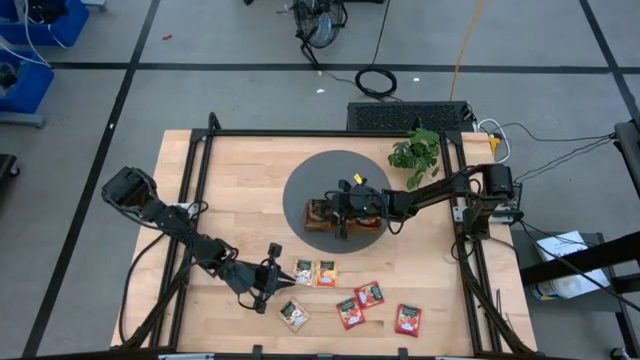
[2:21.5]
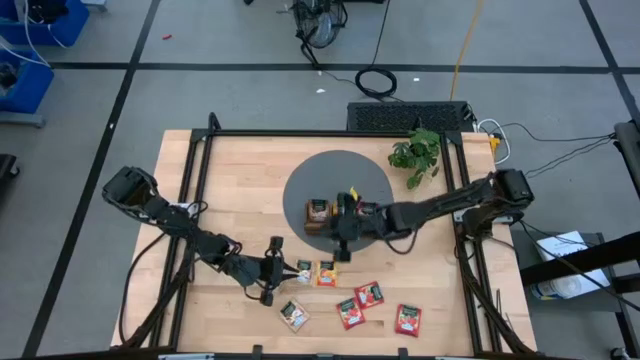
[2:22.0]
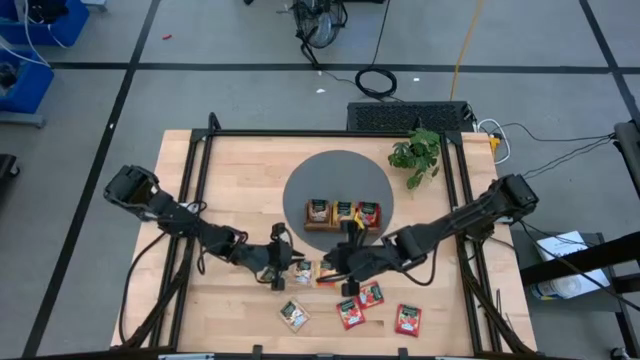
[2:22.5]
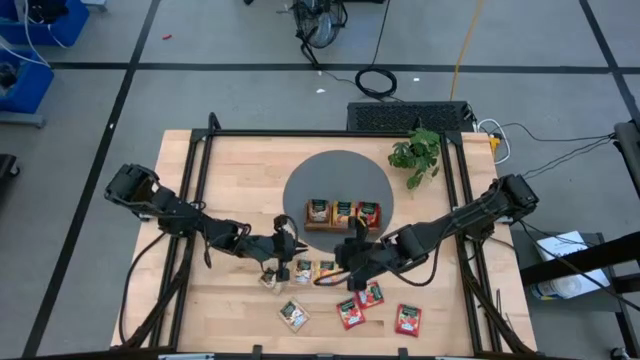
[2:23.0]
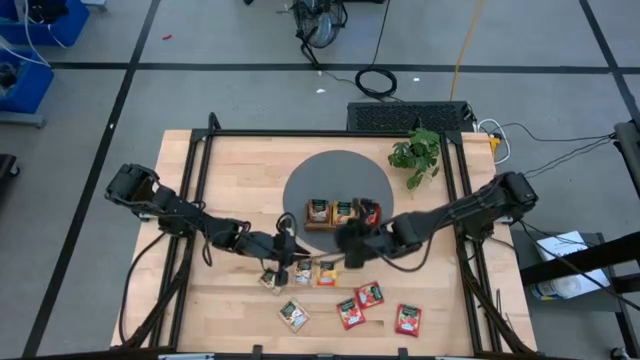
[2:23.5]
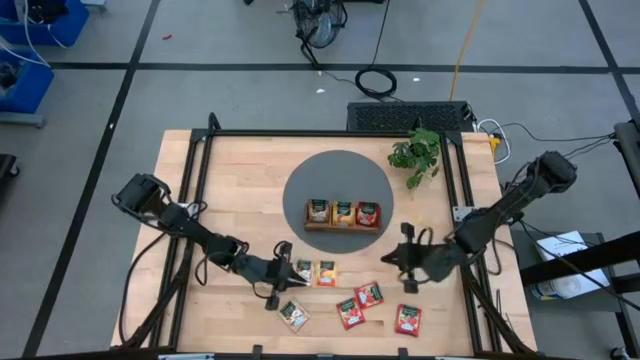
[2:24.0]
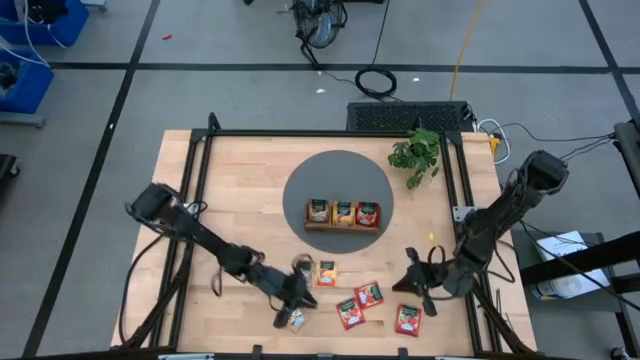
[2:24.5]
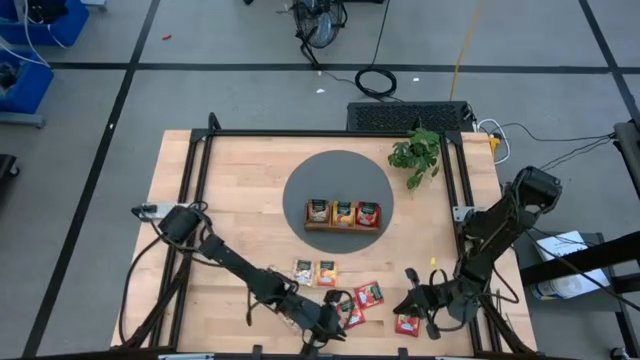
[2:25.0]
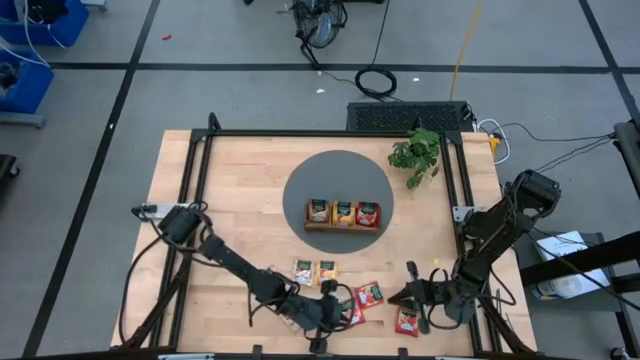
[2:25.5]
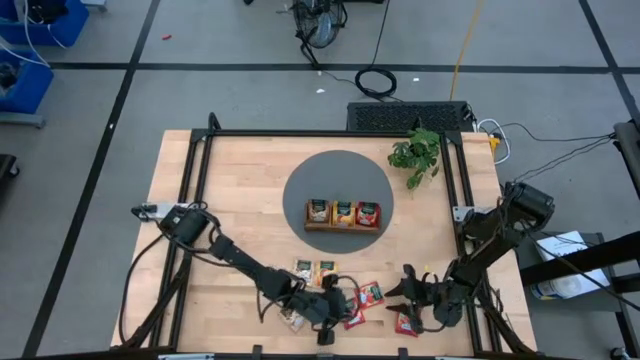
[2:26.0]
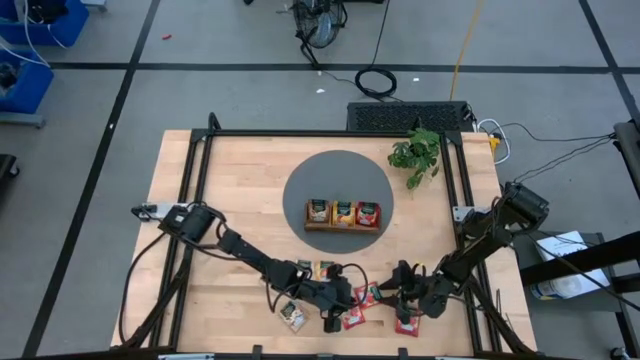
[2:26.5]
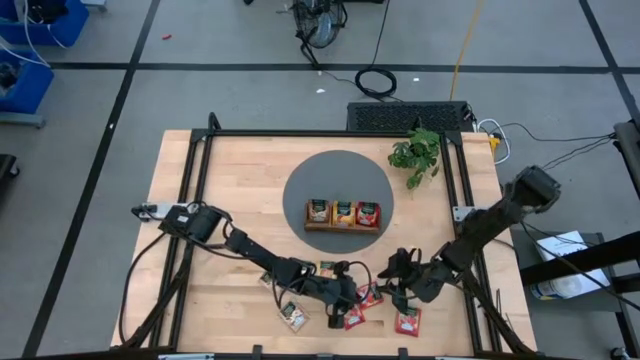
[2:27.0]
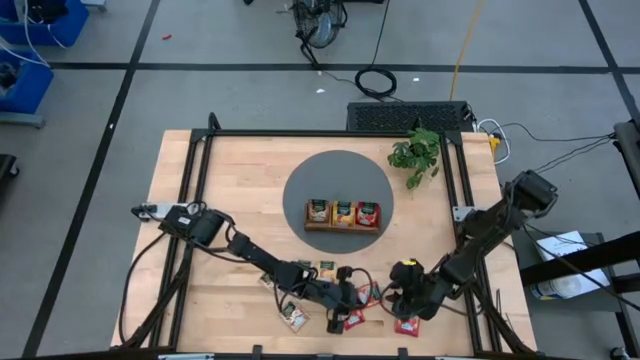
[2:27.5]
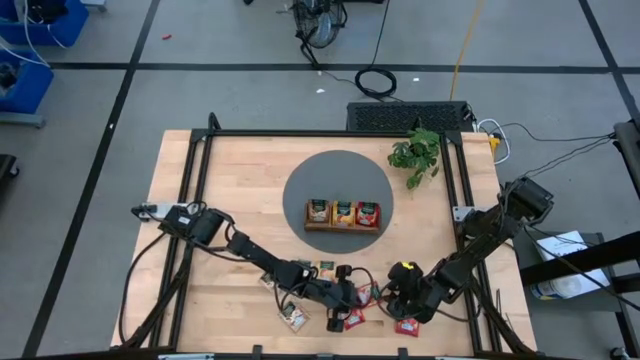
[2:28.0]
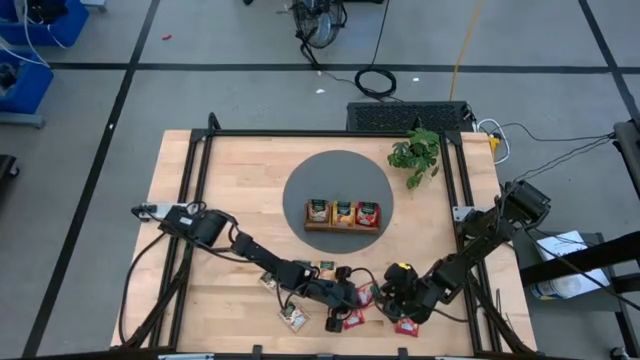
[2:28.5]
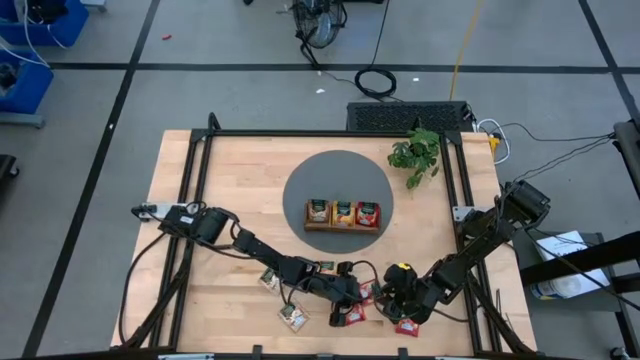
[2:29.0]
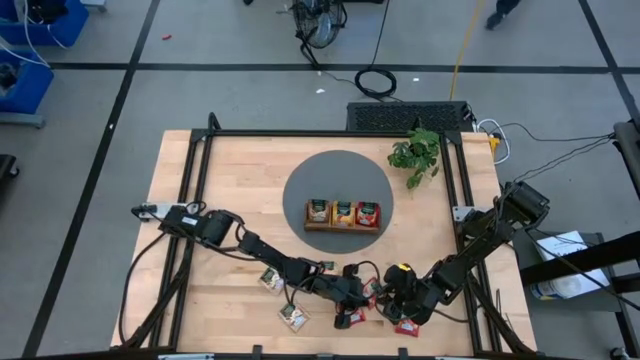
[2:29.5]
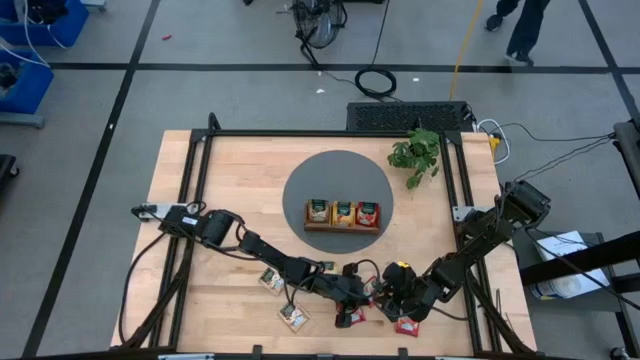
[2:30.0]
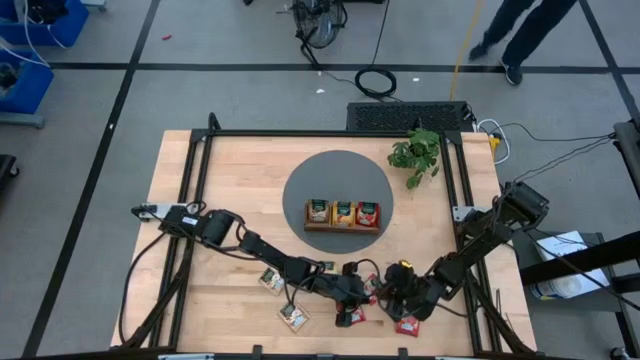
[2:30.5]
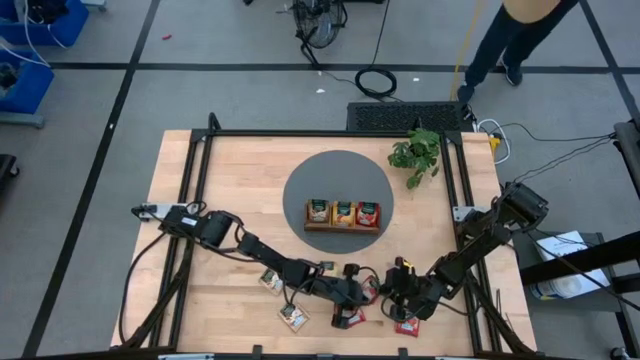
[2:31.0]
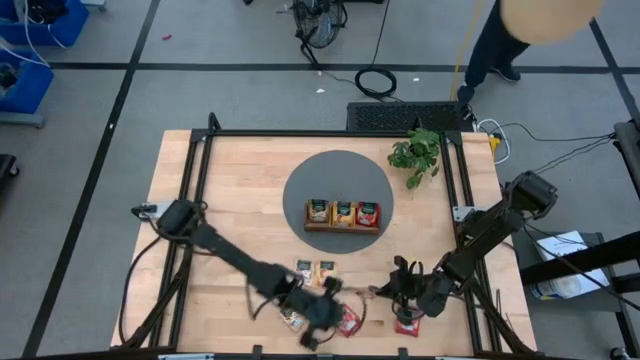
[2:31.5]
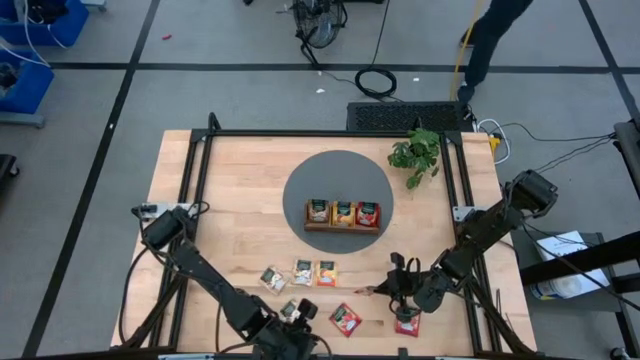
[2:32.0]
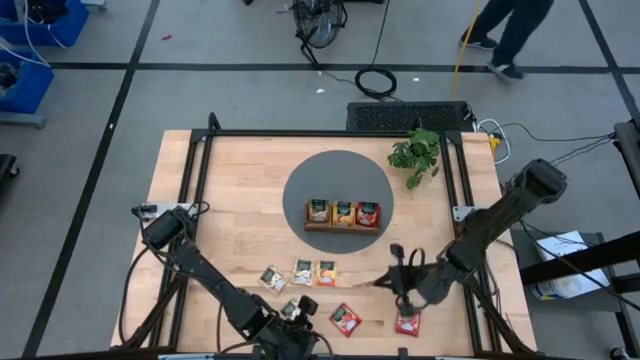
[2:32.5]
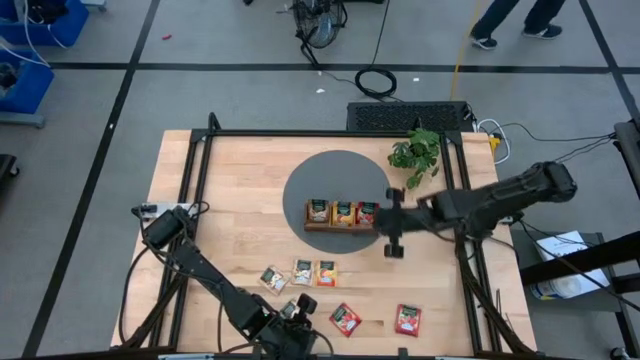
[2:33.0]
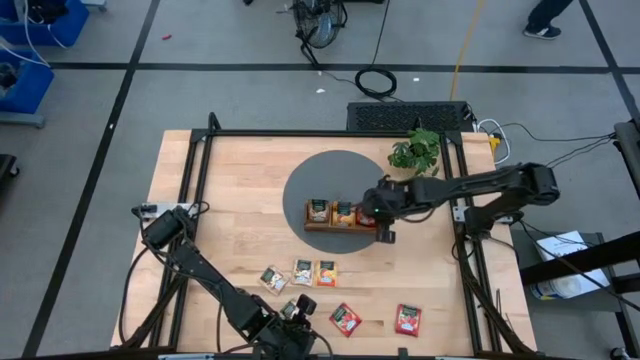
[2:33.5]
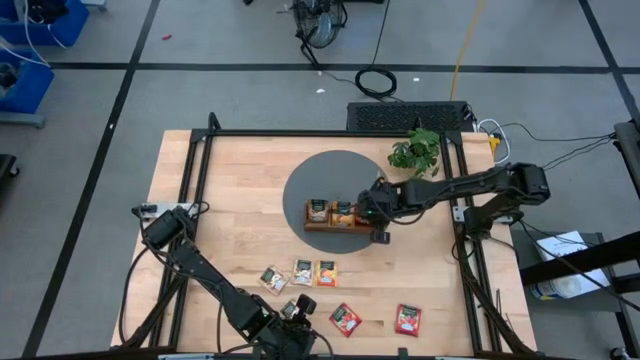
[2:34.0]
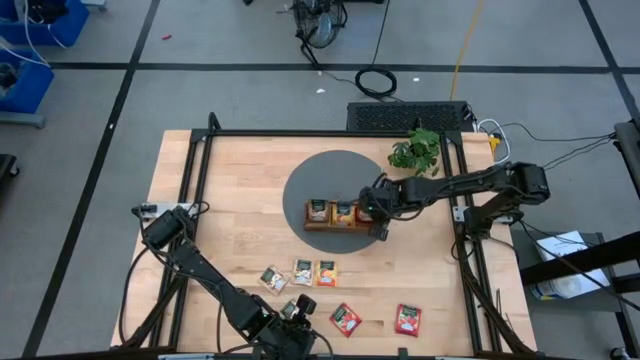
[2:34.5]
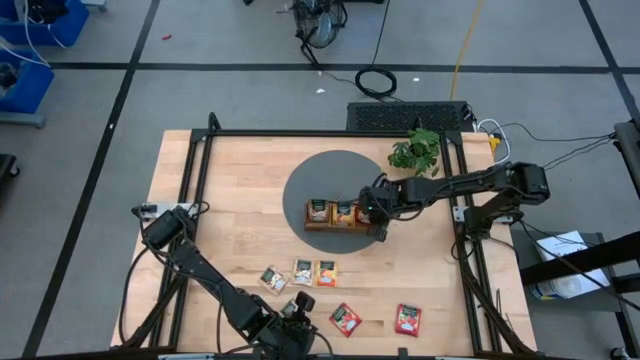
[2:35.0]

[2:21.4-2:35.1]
Task: Pick & Place Tea
Put the red tea bag into the right slot of the wooden organizer

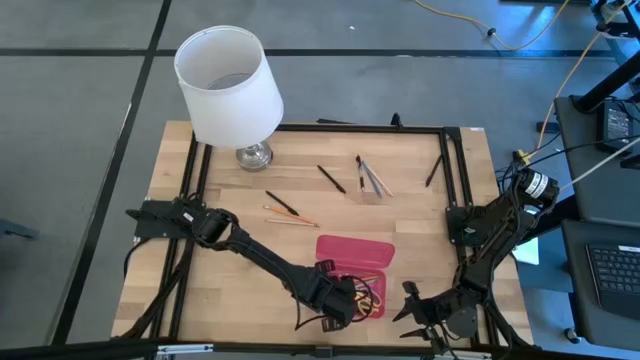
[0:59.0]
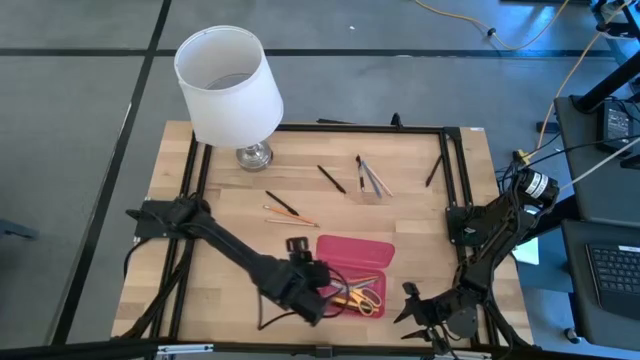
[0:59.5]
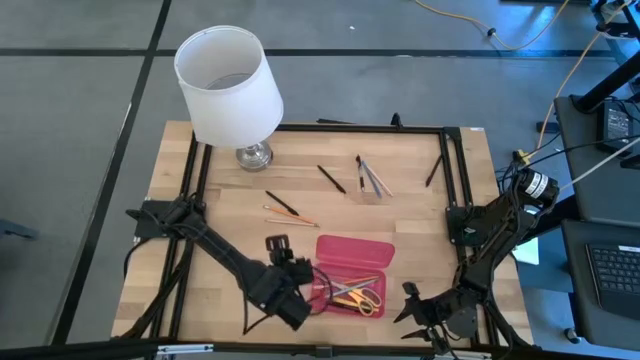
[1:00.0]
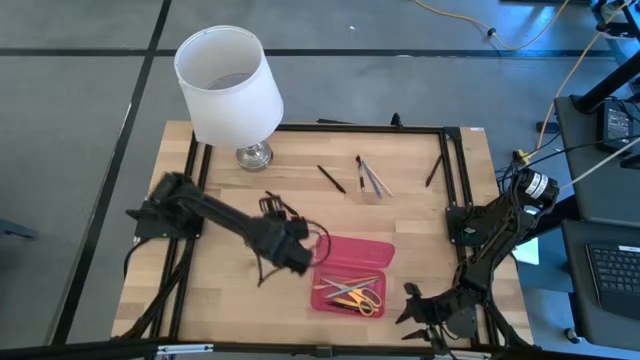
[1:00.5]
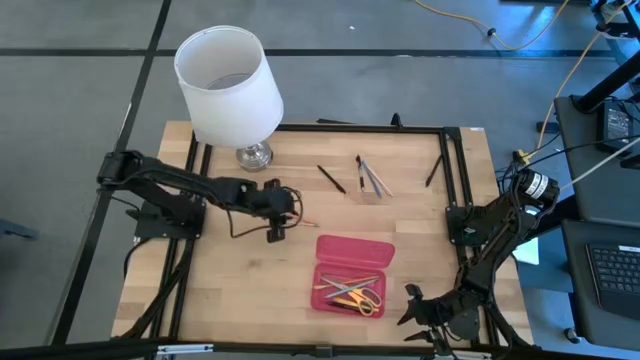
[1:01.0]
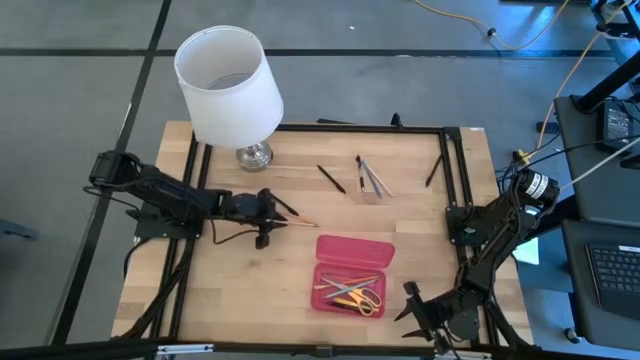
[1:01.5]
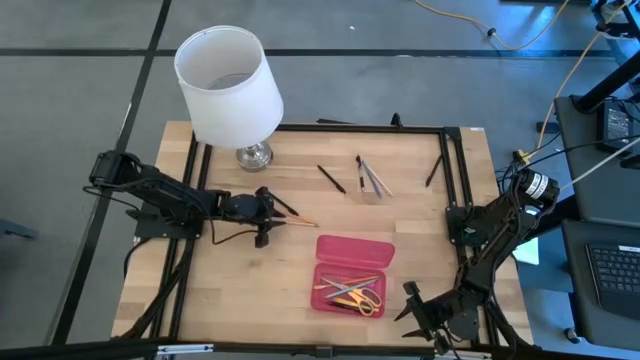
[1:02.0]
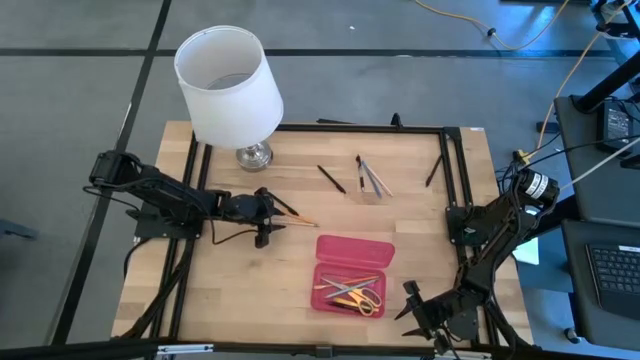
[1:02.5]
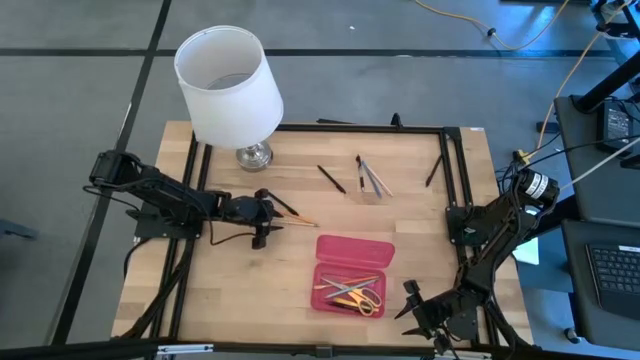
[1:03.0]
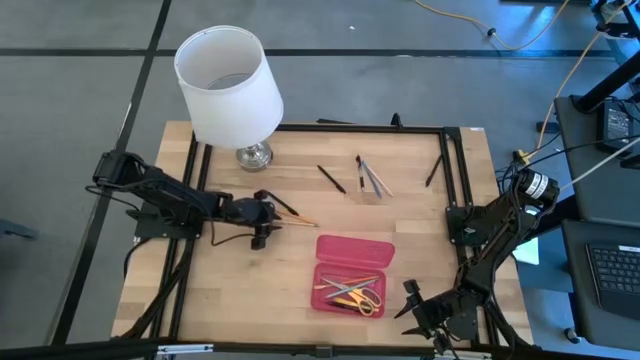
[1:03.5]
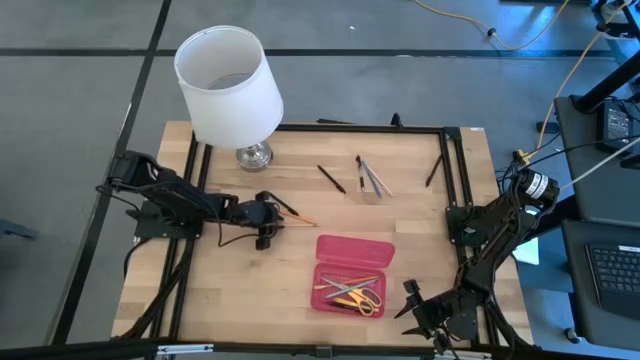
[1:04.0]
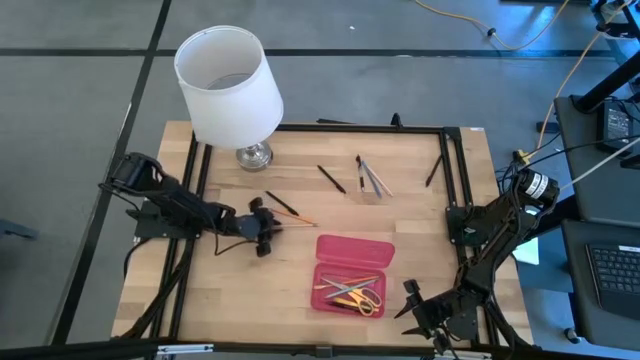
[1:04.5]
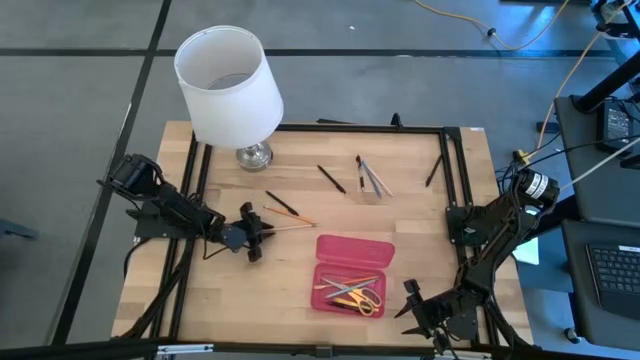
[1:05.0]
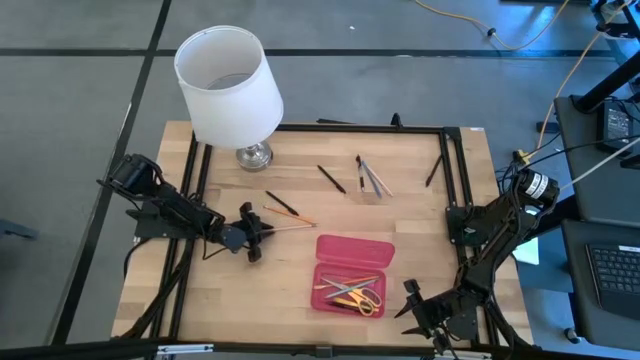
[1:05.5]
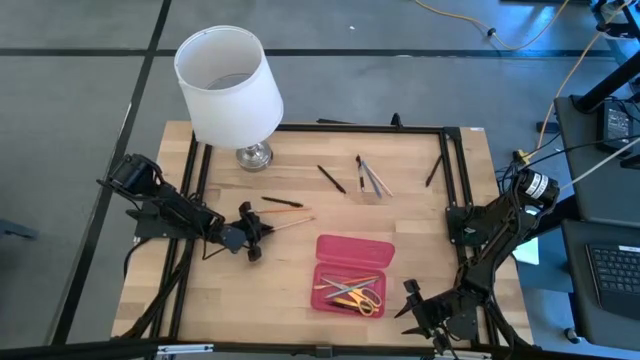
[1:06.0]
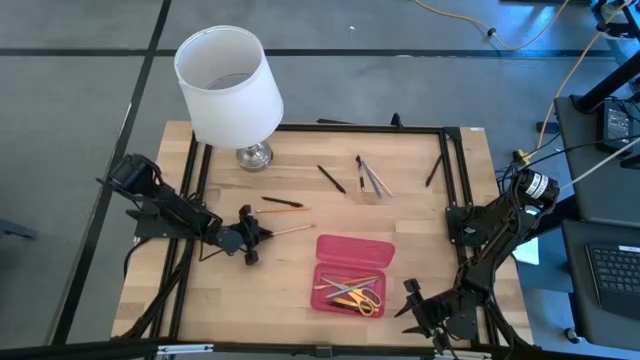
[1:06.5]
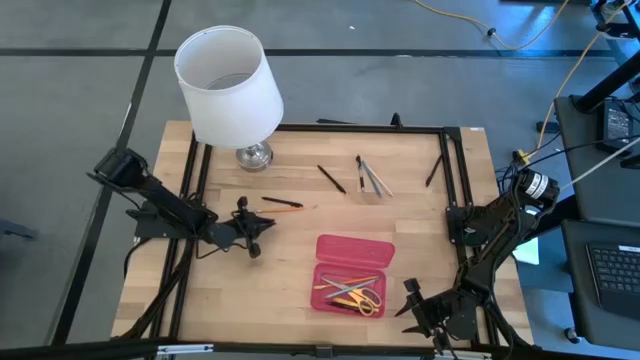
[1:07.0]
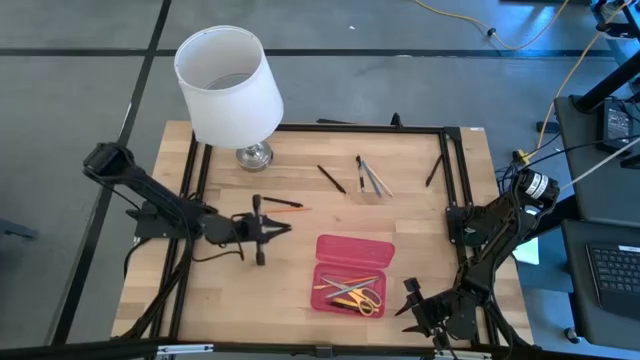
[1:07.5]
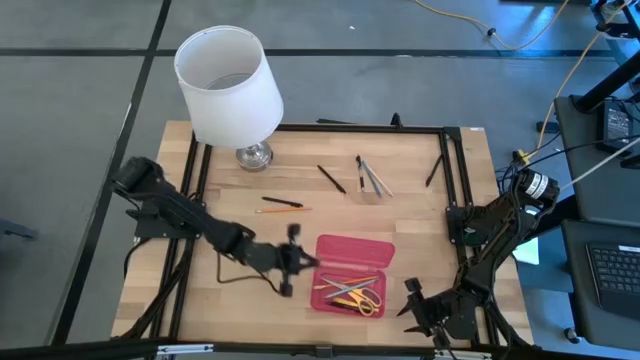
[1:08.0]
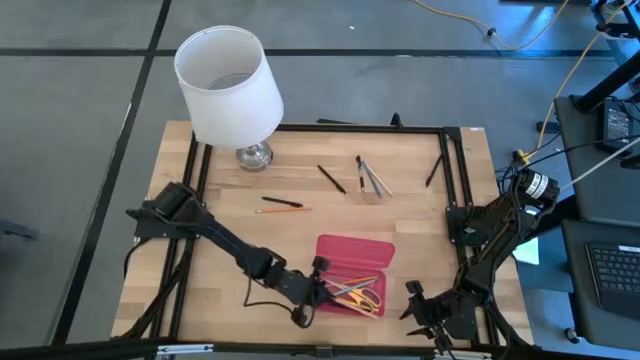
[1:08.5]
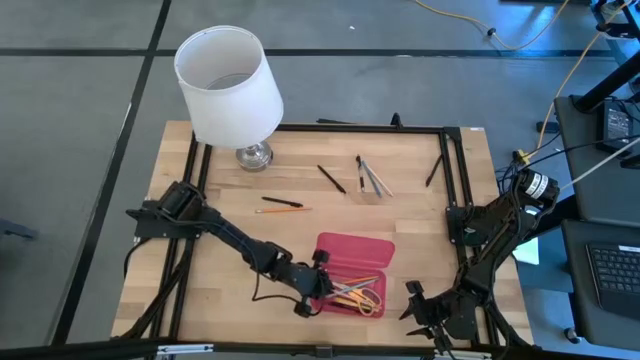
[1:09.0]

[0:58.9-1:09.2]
Task: Pick & place school supplies into a supply box
Put the brown supply into the pink supply box
